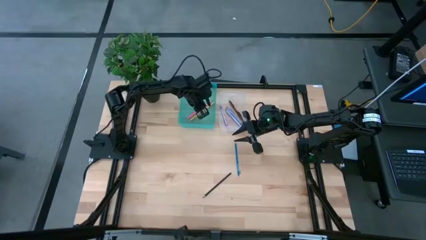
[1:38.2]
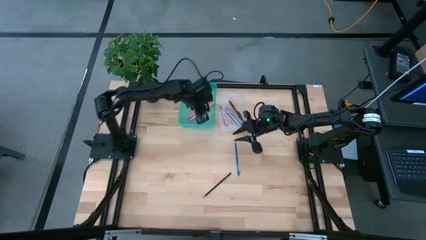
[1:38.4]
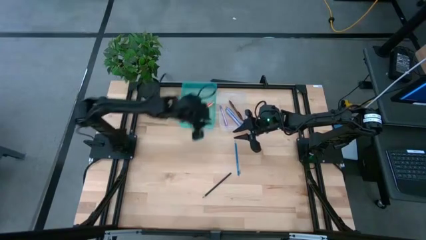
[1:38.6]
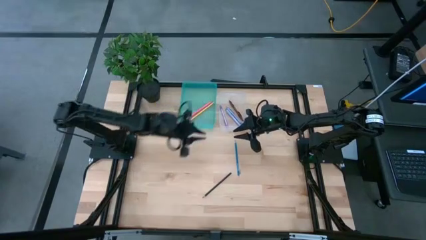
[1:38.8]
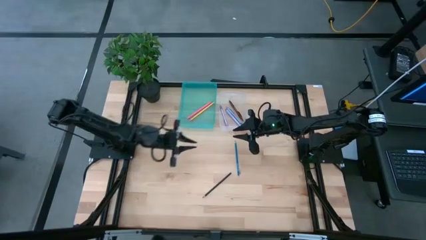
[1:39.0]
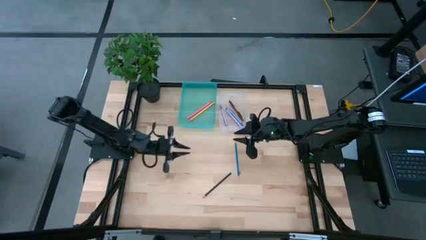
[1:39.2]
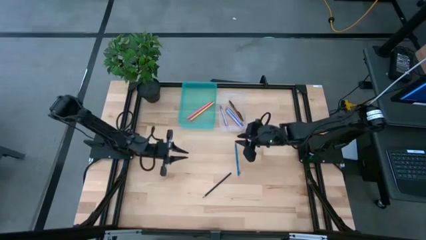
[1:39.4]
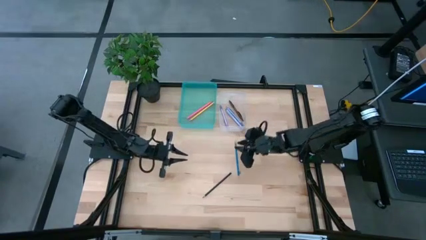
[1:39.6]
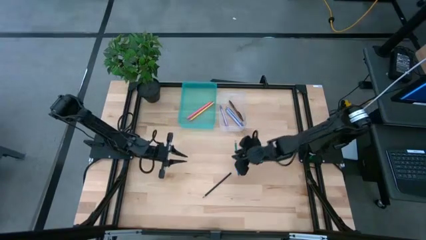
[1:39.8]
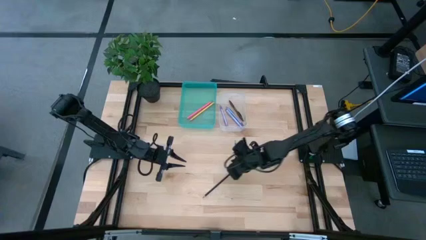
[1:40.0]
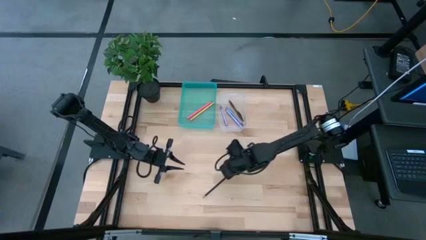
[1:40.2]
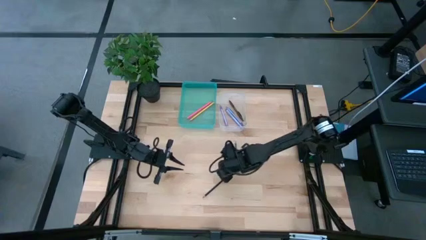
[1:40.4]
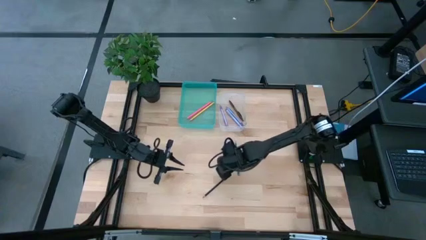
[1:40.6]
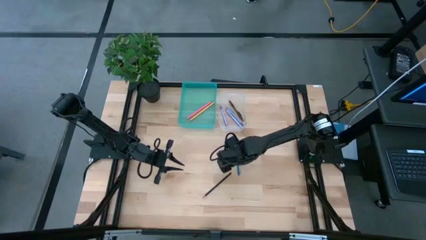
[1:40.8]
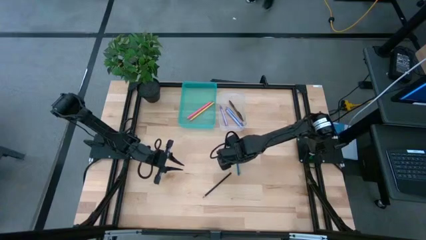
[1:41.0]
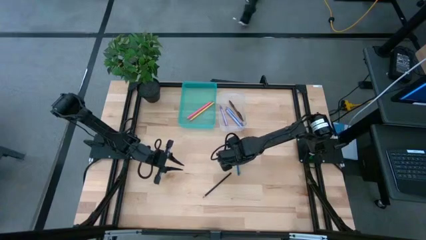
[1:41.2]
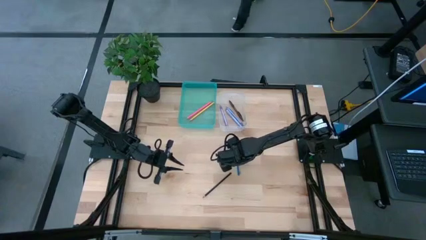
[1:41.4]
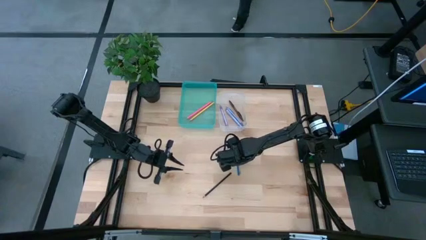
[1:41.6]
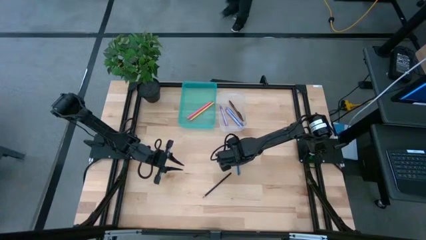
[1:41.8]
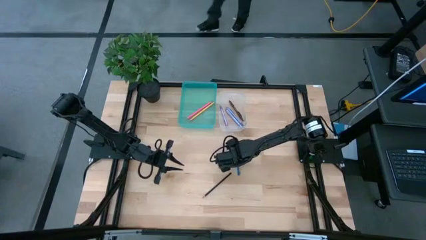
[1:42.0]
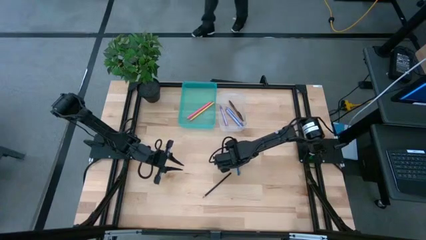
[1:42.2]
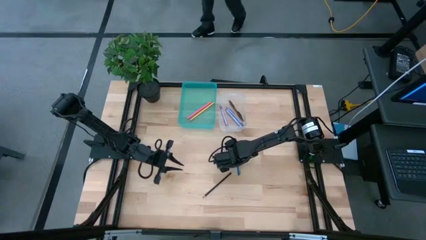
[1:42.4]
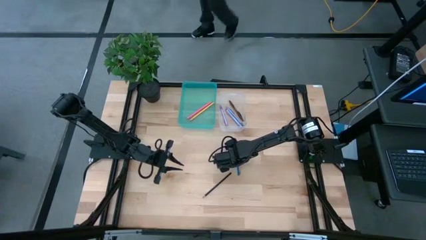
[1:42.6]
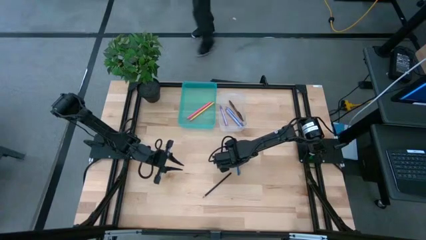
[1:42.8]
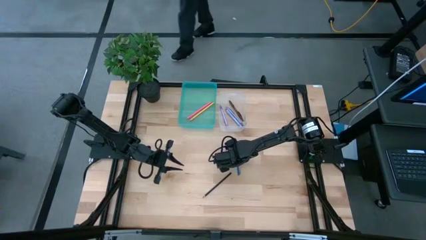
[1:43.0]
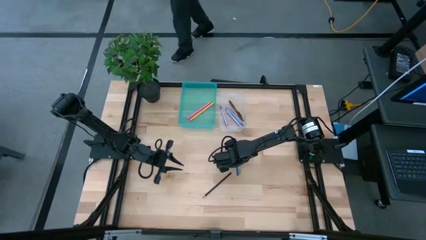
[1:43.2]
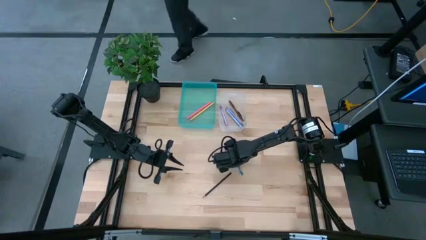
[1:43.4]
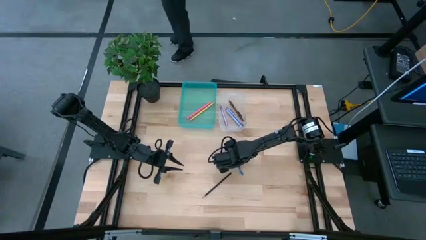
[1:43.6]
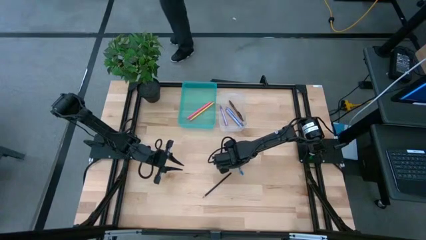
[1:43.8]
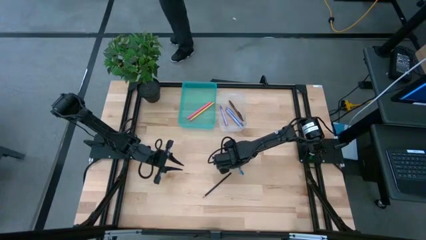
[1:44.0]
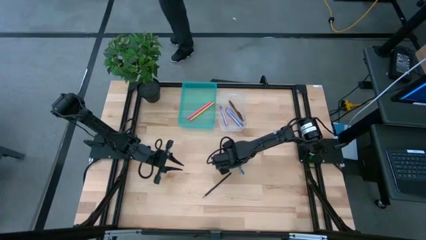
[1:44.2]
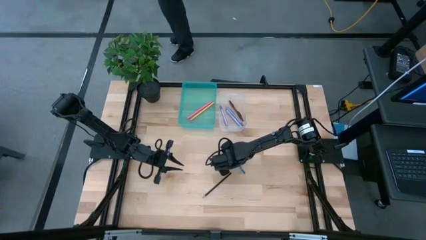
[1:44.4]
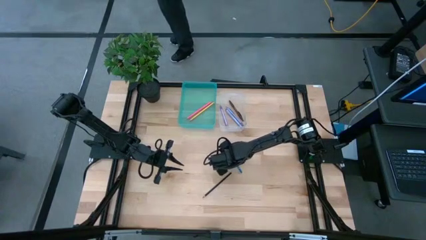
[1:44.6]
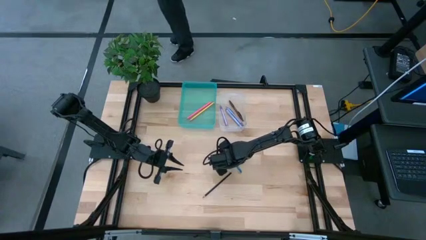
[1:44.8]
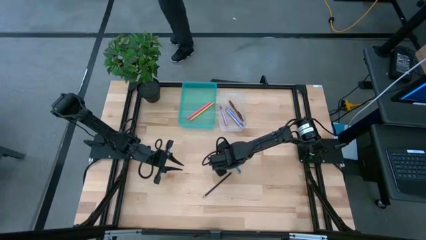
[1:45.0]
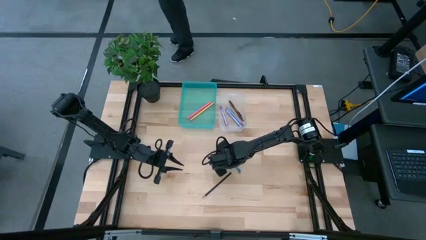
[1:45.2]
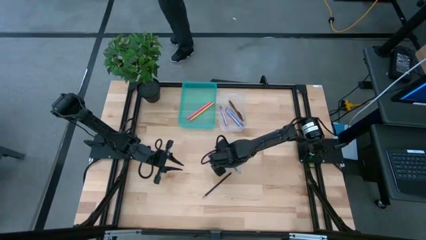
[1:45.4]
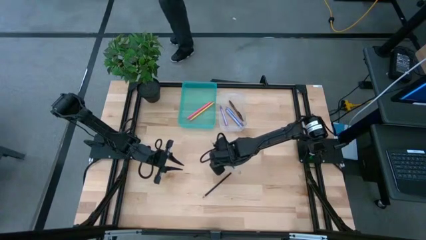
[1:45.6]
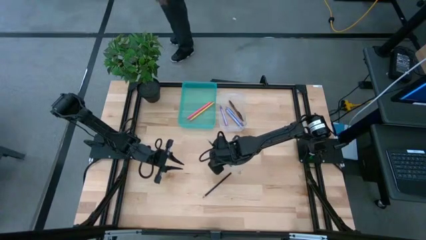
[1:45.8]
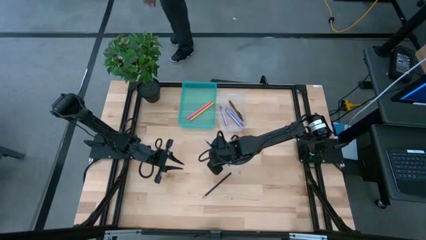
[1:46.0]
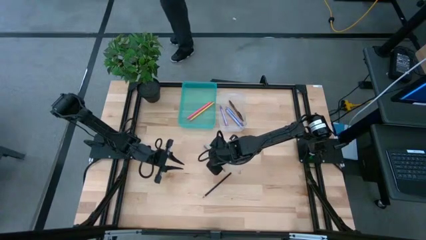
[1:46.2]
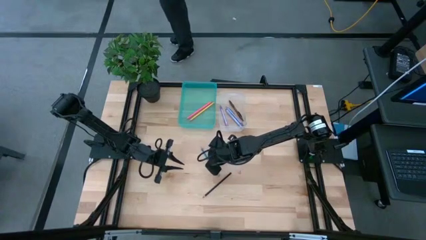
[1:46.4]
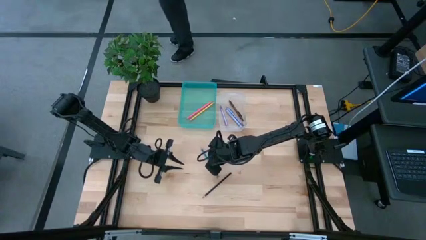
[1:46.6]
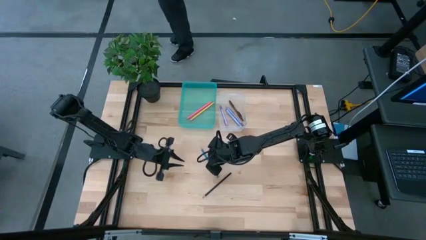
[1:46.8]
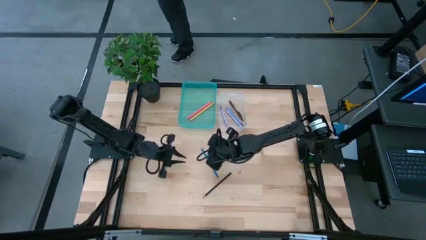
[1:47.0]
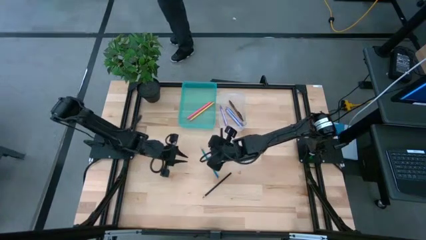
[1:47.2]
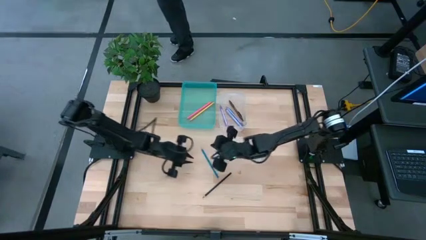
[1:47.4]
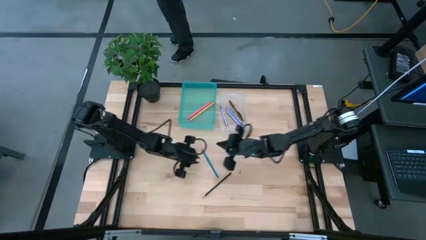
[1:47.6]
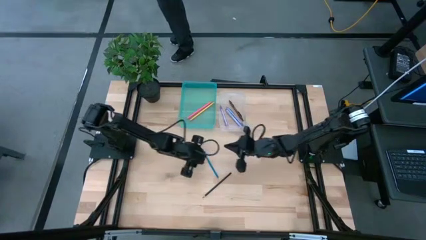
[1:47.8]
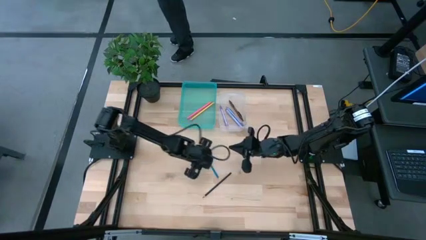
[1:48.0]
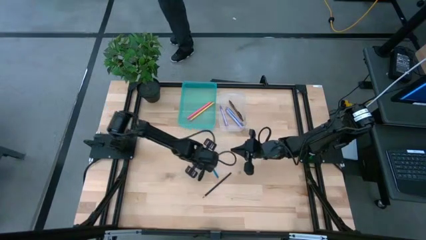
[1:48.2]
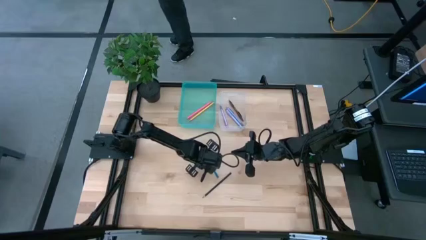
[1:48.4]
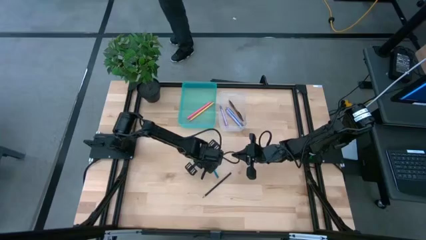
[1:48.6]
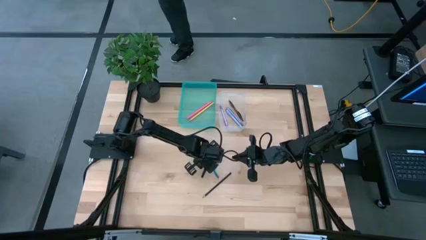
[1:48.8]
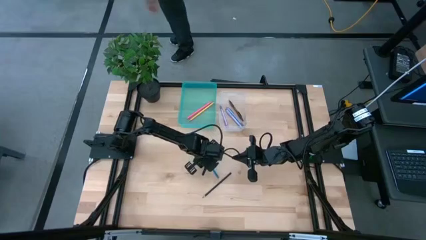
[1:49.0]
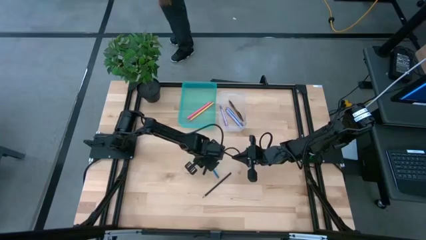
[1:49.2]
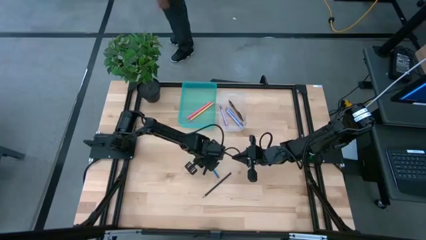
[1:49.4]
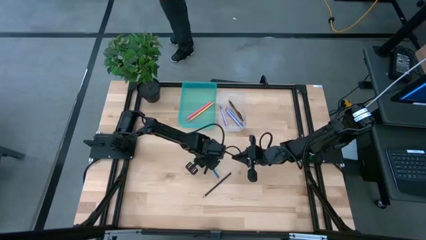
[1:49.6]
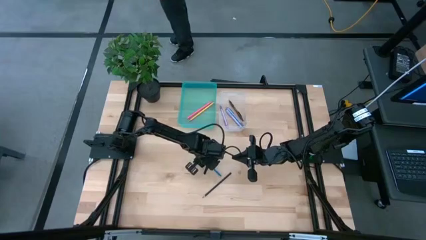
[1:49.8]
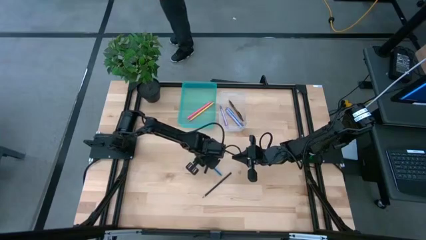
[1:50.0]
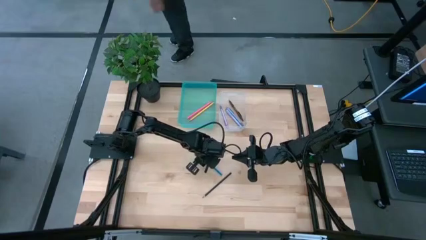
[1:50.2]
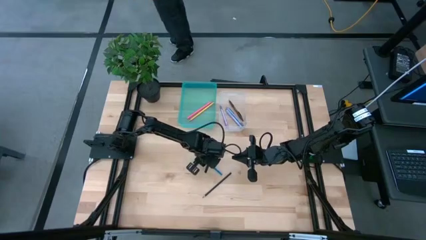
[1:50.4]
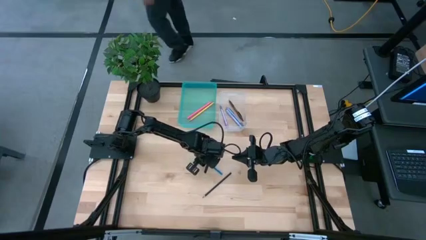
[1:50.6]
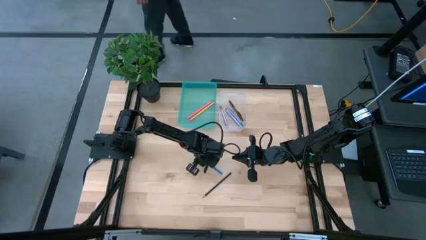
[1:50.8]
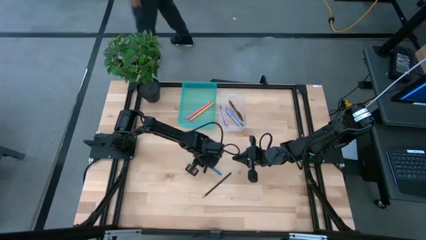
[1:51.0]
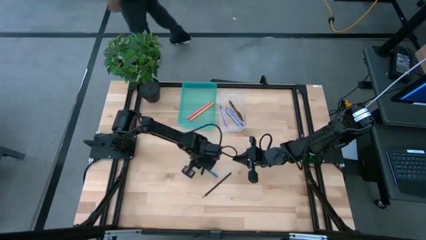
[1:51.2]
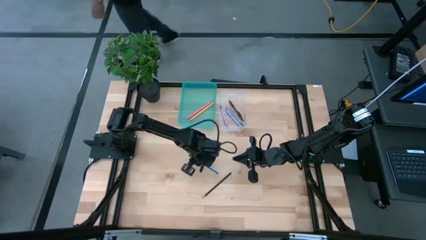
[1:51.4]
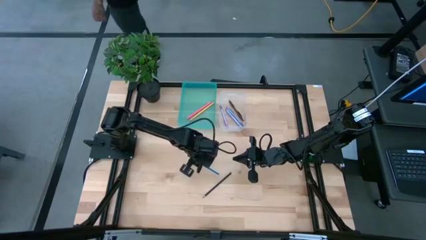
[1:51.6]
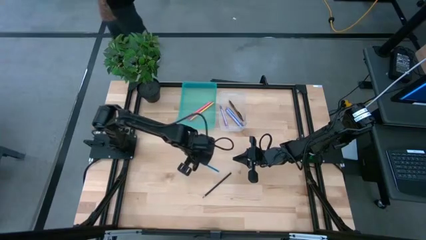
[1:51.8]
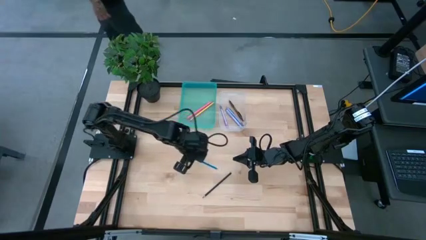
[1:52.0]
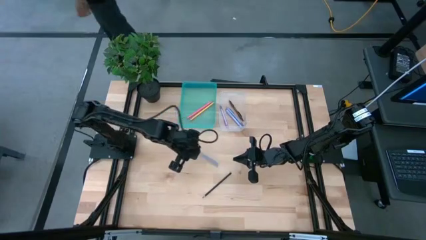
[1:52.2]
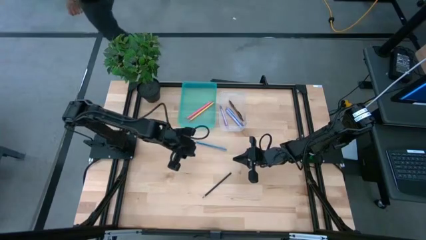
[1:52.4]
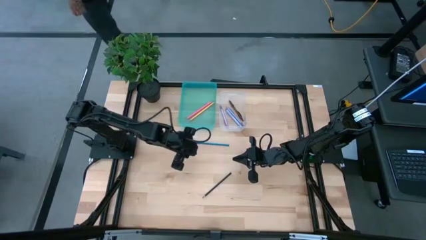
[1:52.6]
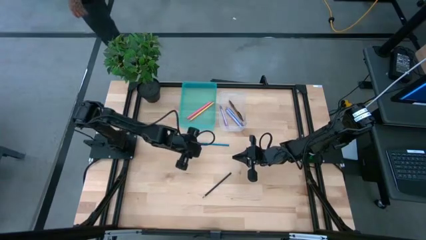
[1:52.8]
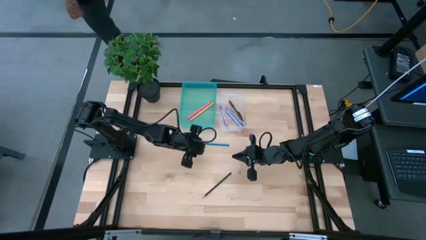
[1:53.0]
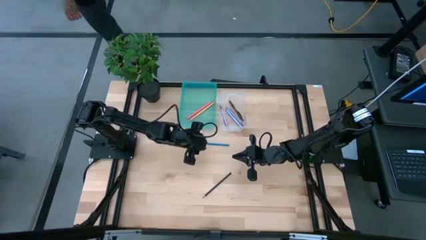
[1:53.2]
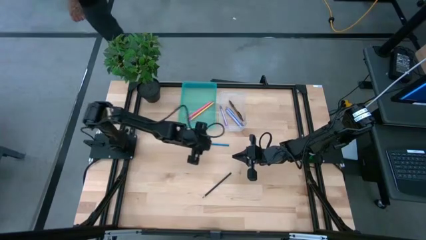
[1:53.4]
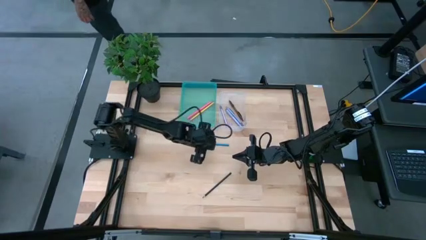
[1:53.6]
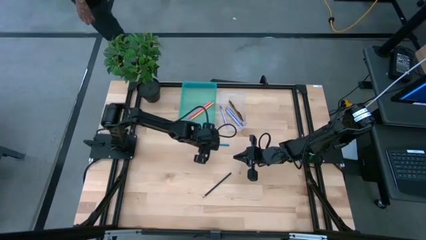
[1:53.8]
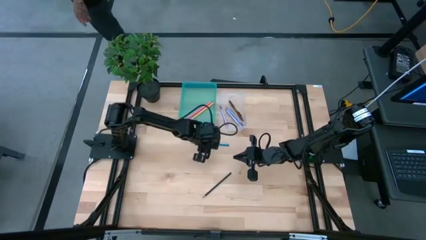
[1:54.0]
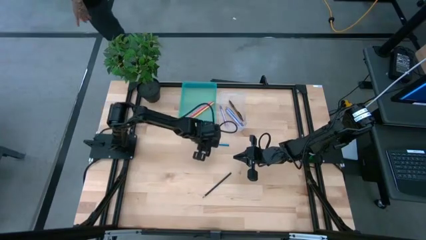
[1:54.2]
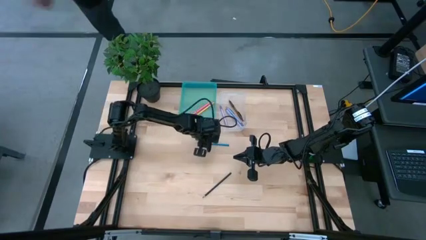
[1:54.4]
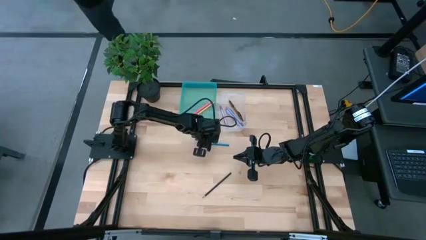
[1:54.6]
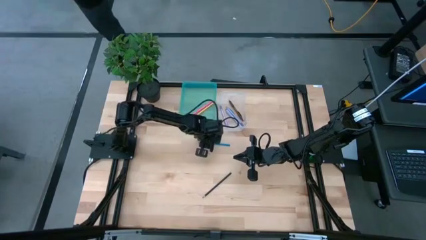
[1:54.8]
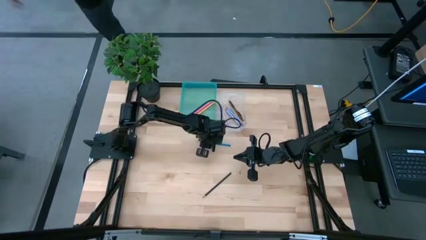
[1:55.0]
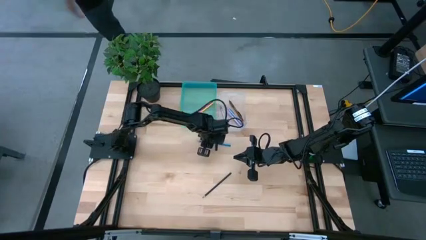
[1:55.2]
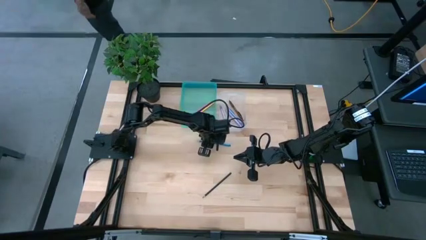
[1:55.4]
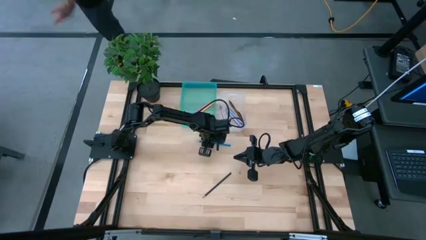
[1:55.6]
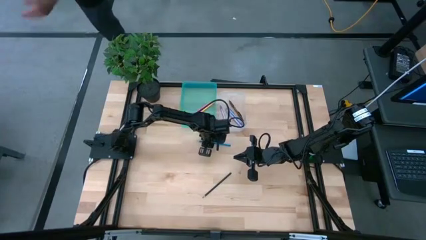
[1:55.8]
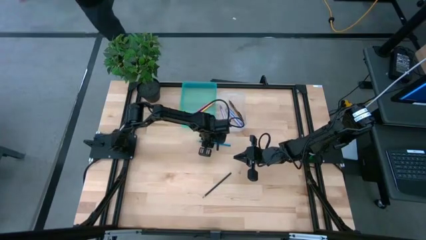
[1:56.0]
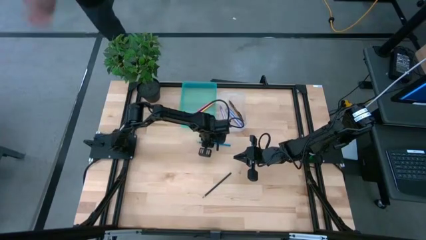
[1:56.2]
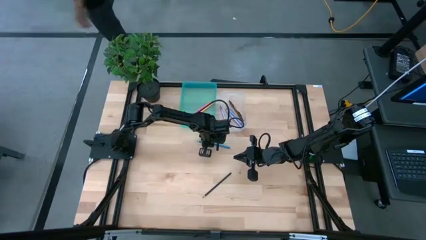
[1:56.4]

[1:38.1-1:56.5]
Task: Sort pens & pencils
Put the blue pencil into the blue bin
